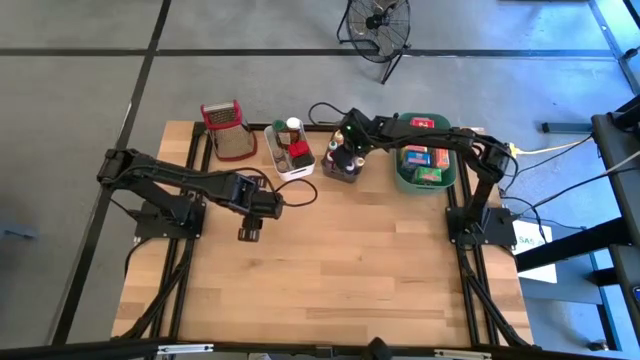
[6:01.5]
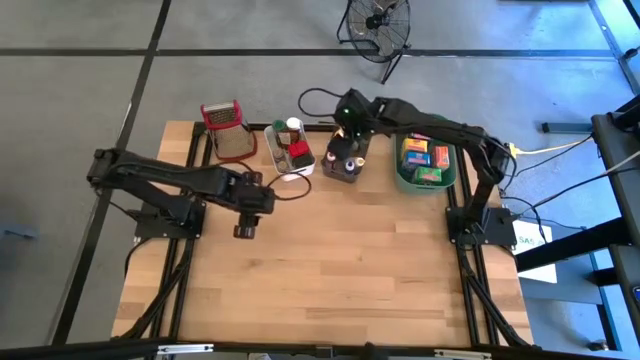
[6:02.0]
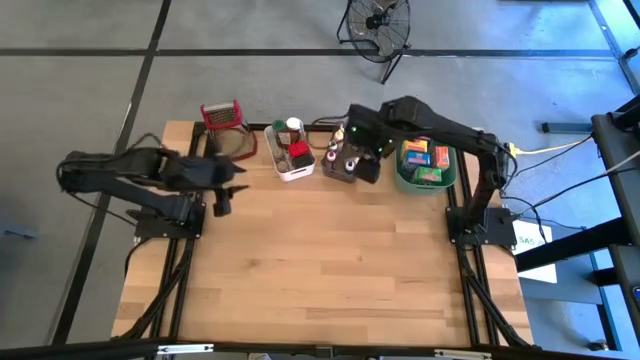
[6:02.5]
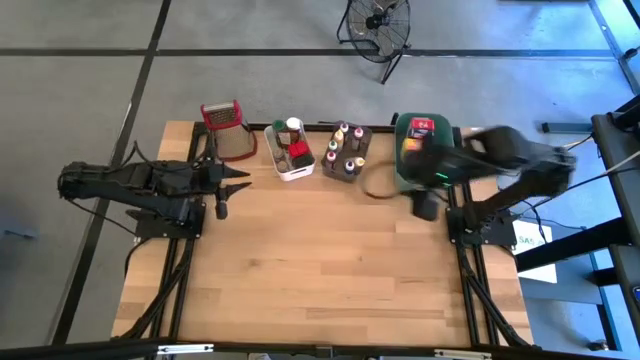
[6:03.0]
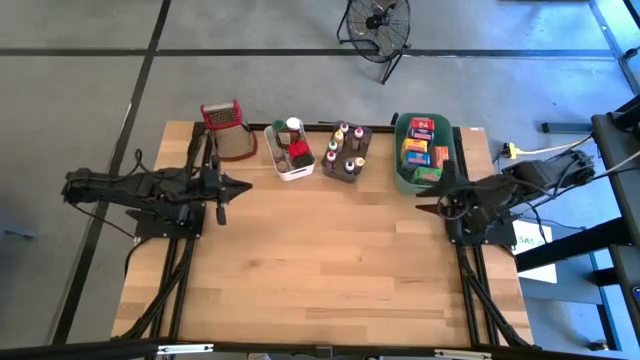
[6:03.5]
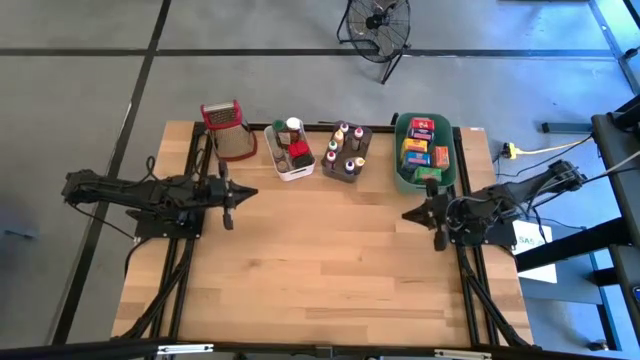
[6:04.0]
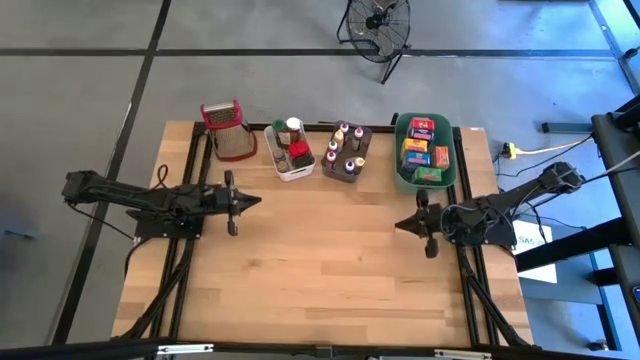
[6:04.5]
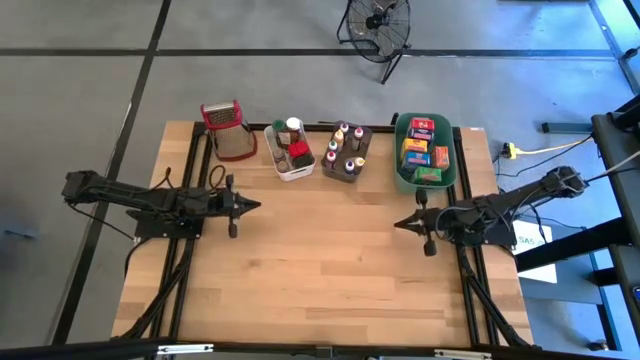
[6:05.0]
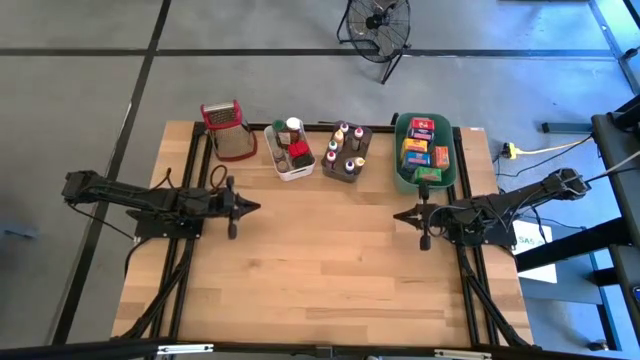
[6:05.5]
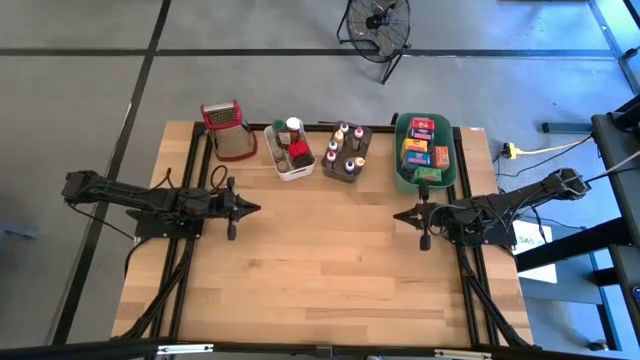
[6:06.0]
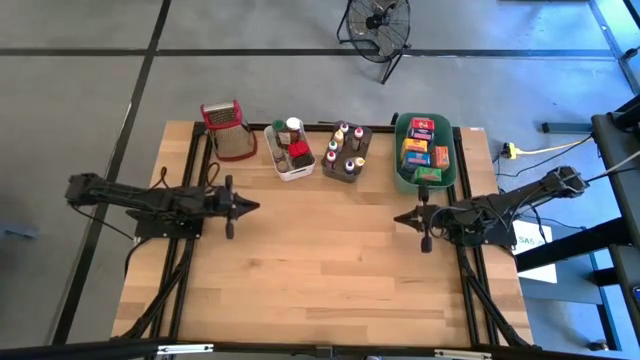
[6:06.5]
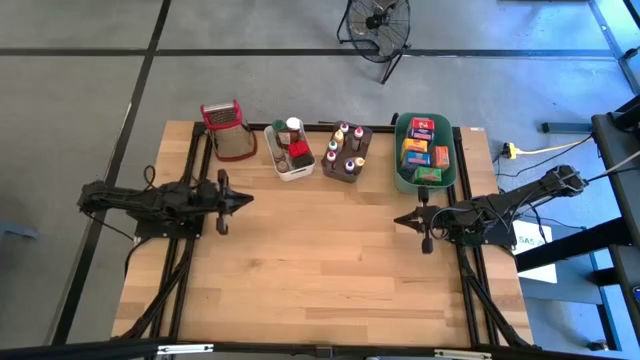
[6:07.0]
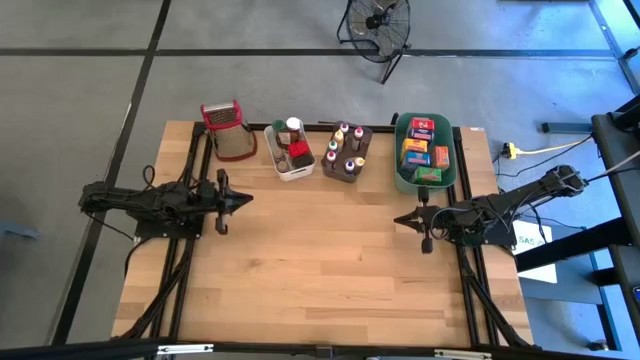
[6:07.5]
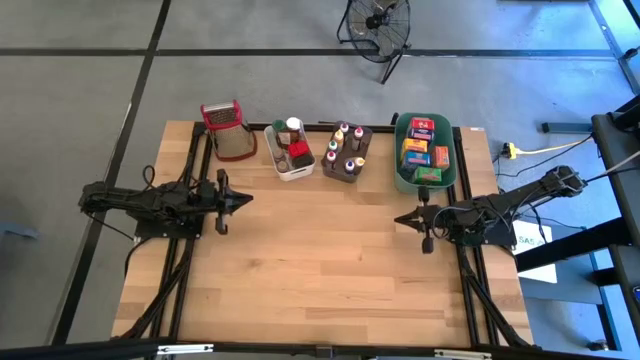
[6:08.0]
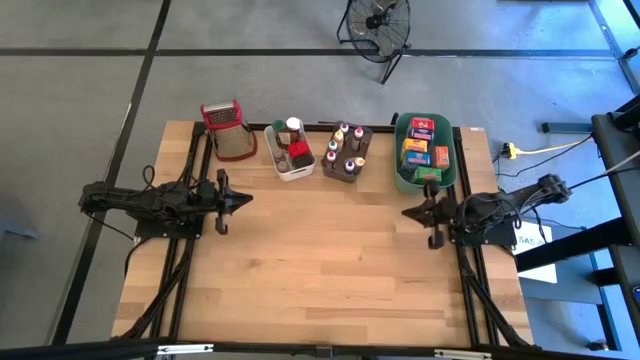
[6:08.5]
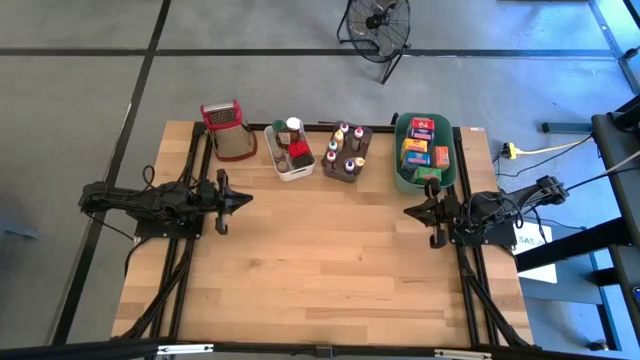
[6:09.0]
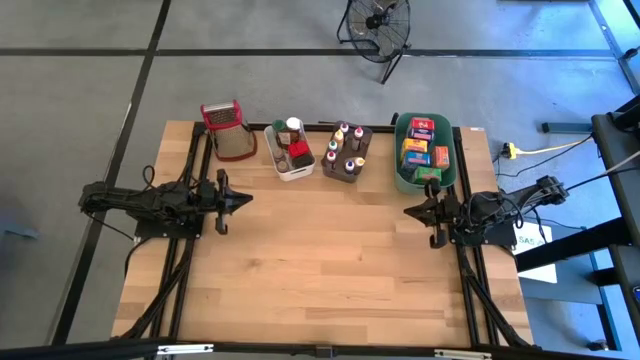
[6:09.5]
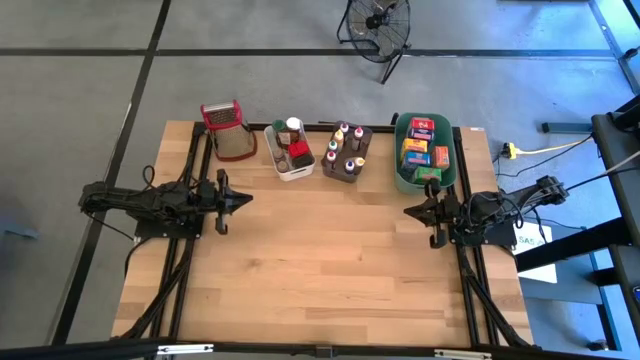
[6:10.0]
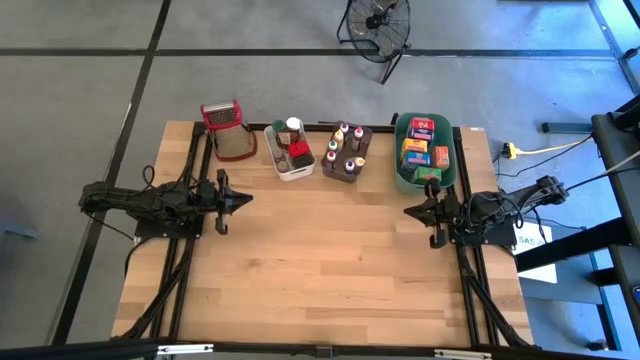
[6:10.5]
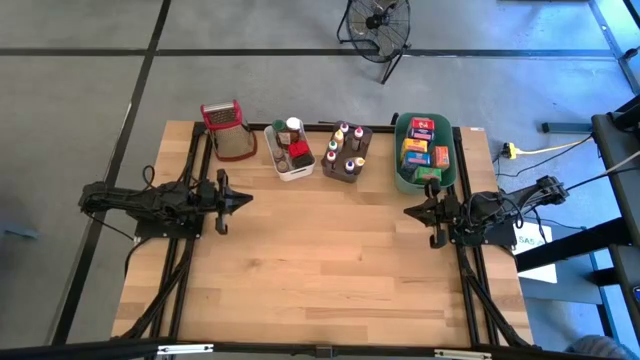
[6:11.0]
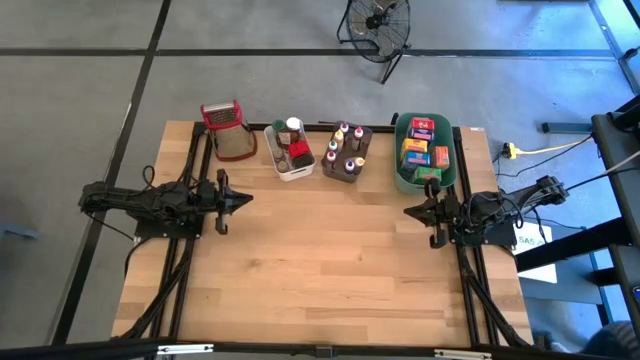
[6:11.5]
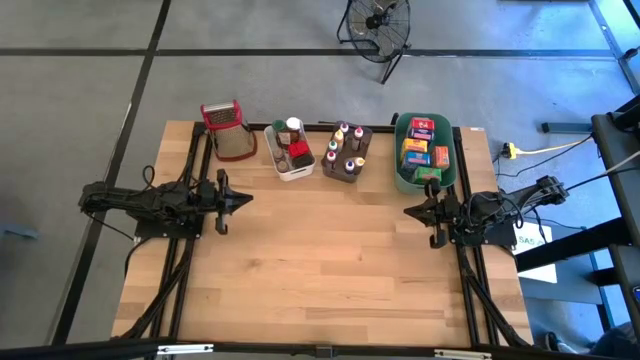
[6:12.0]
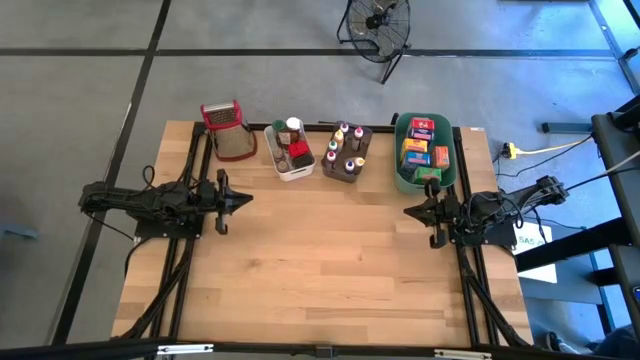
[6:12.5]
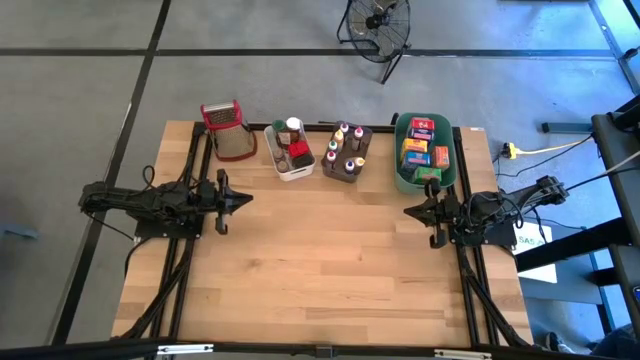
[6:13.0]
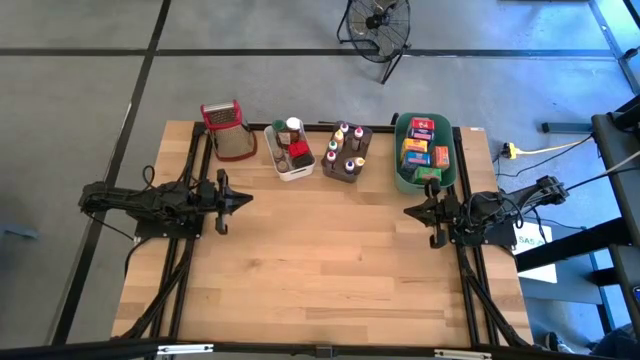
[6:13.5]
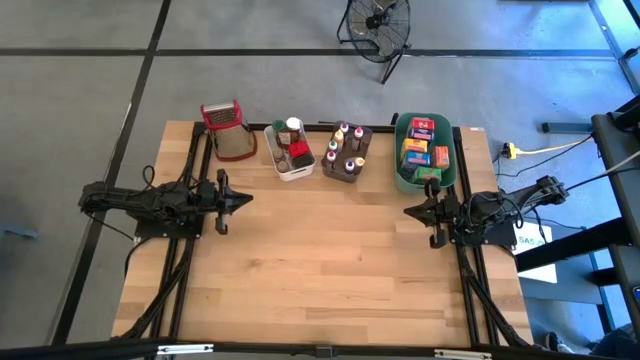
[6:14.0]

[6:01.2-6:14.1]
Task: Pick & Place Kitchen Items
Return to Home Position
